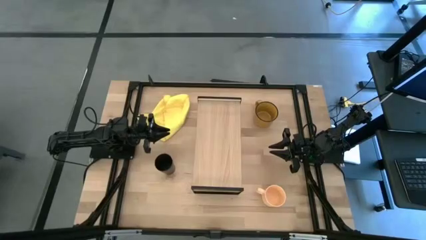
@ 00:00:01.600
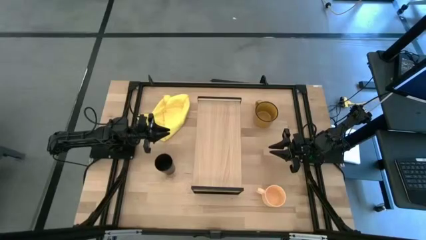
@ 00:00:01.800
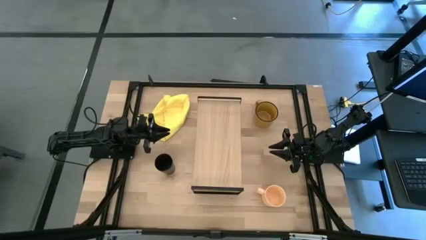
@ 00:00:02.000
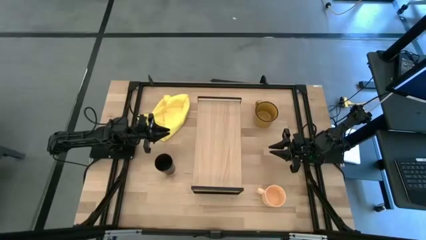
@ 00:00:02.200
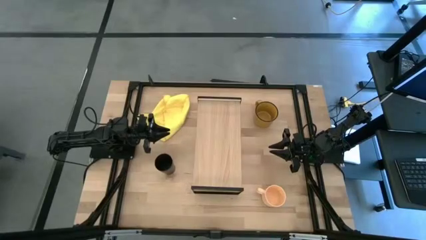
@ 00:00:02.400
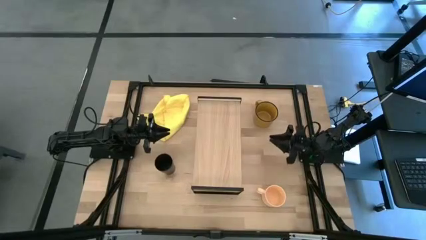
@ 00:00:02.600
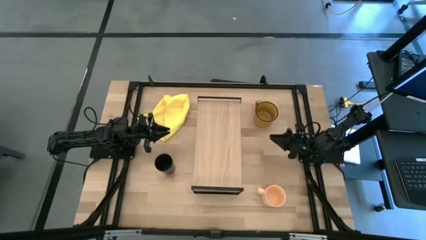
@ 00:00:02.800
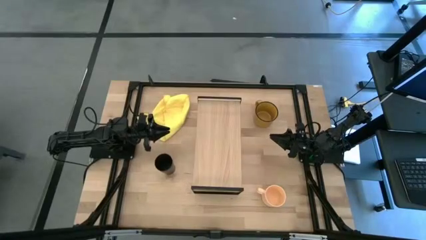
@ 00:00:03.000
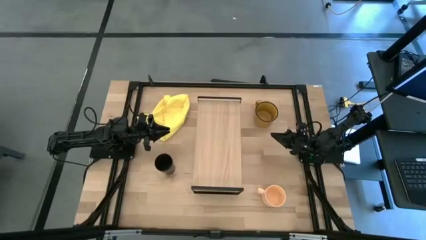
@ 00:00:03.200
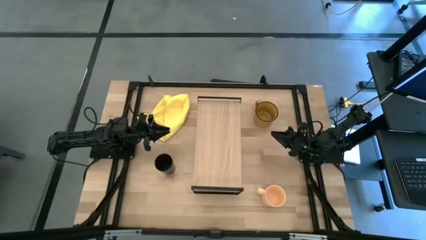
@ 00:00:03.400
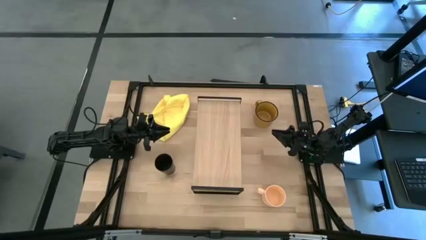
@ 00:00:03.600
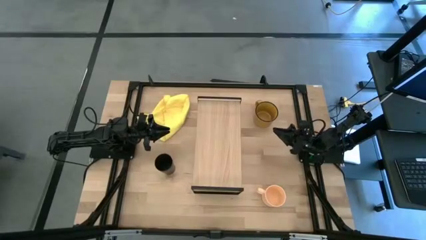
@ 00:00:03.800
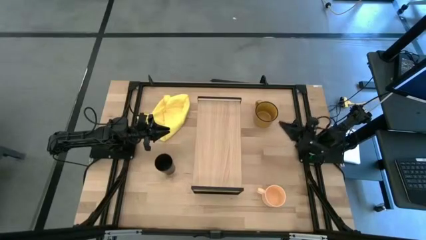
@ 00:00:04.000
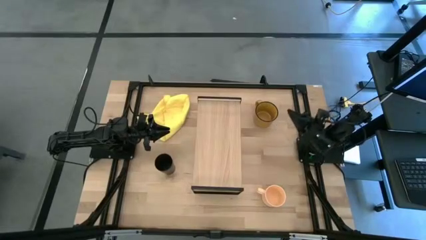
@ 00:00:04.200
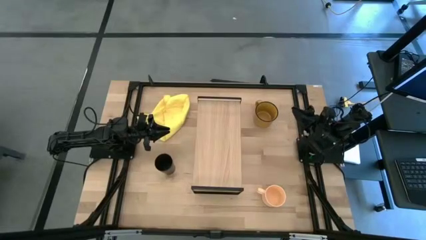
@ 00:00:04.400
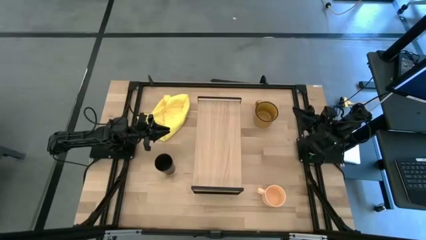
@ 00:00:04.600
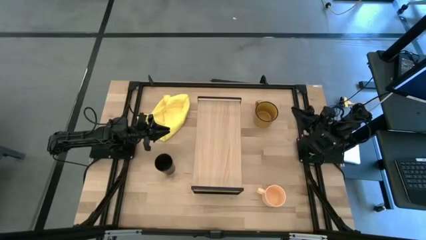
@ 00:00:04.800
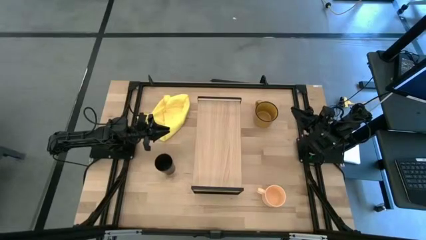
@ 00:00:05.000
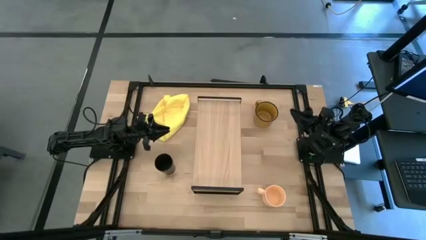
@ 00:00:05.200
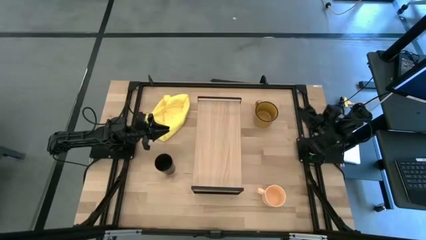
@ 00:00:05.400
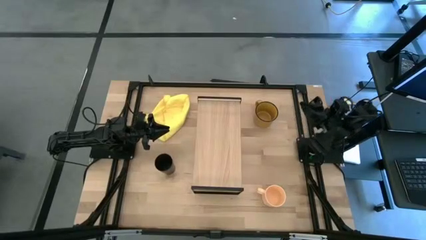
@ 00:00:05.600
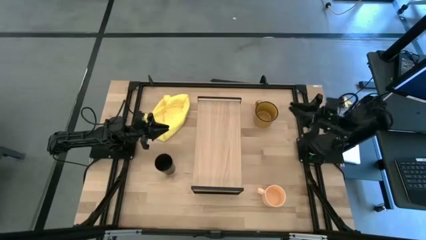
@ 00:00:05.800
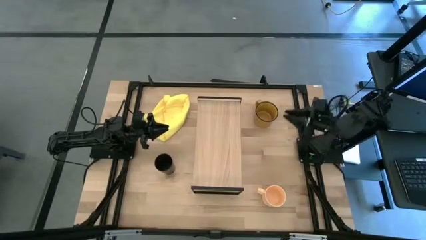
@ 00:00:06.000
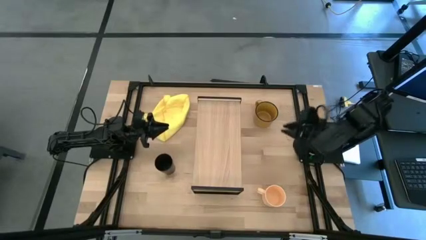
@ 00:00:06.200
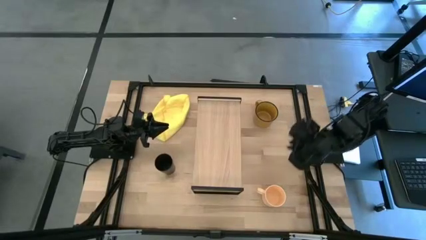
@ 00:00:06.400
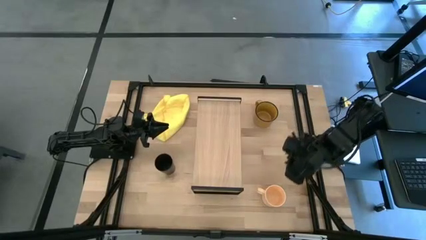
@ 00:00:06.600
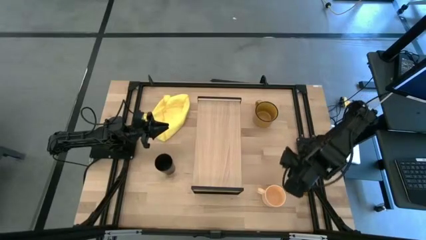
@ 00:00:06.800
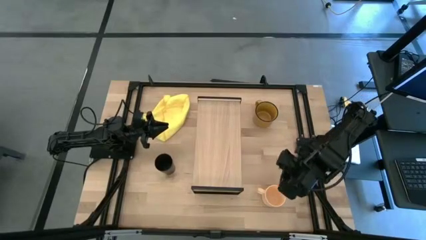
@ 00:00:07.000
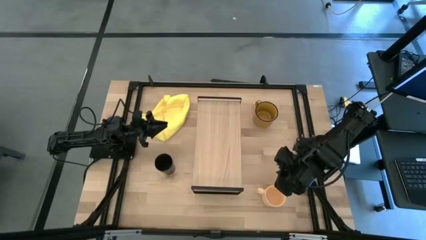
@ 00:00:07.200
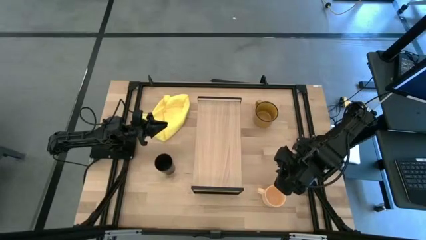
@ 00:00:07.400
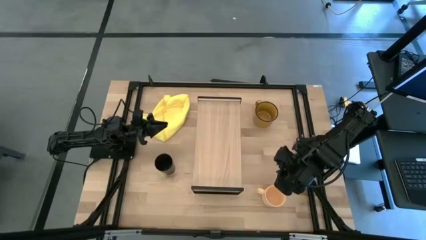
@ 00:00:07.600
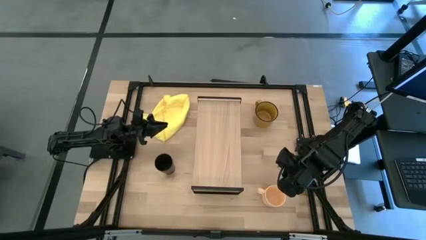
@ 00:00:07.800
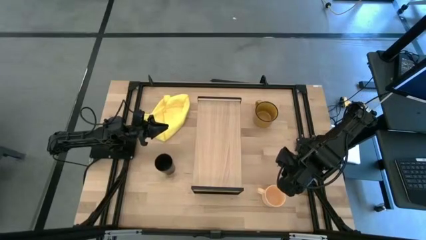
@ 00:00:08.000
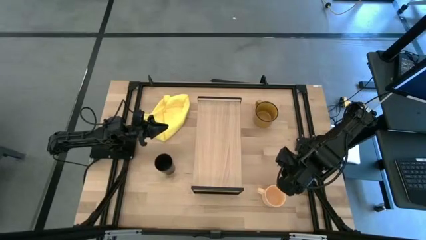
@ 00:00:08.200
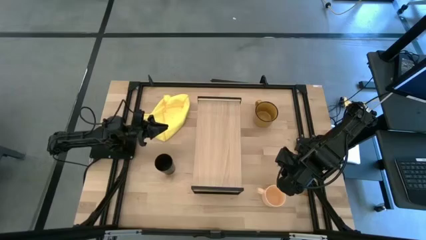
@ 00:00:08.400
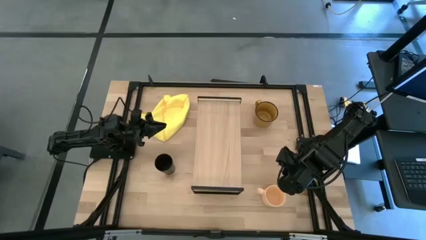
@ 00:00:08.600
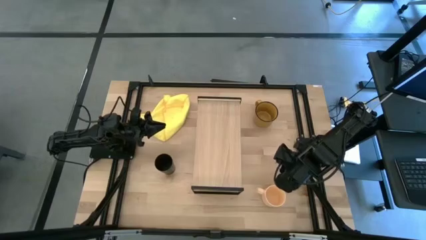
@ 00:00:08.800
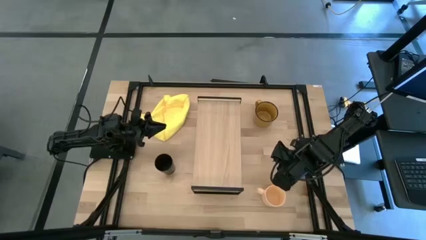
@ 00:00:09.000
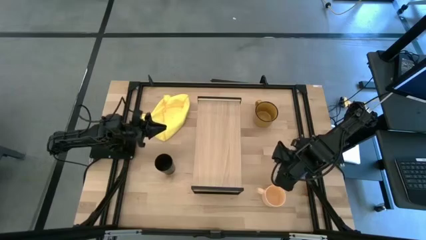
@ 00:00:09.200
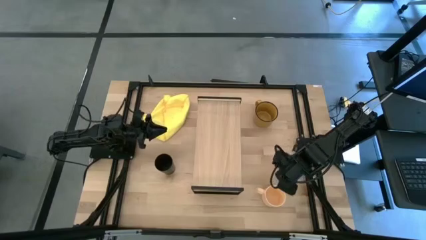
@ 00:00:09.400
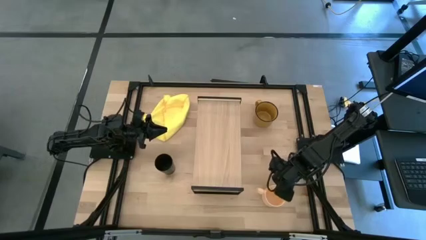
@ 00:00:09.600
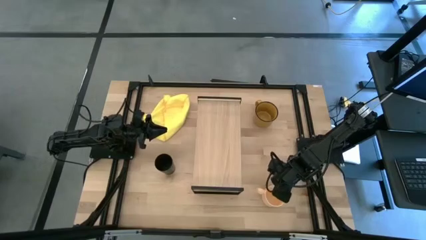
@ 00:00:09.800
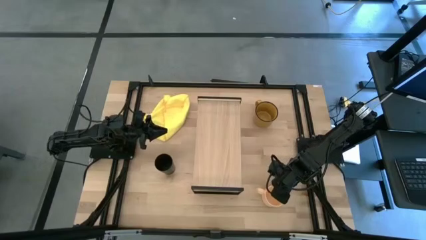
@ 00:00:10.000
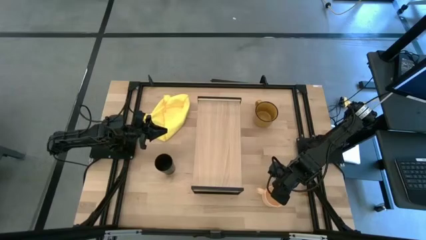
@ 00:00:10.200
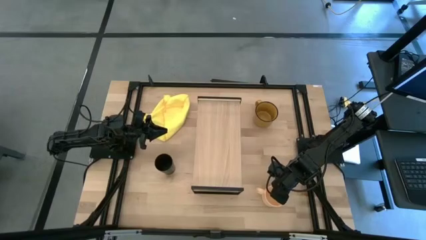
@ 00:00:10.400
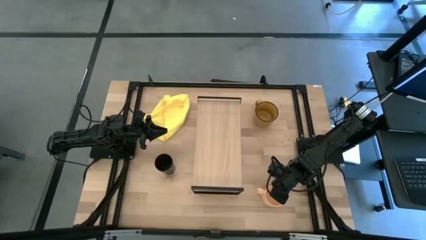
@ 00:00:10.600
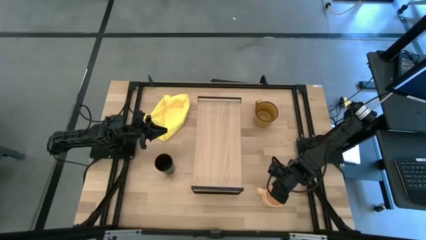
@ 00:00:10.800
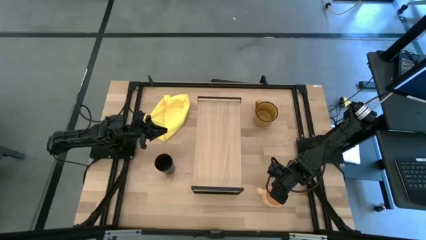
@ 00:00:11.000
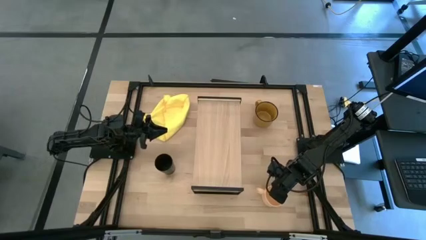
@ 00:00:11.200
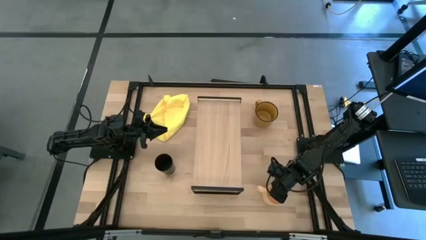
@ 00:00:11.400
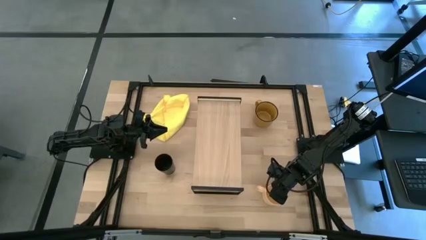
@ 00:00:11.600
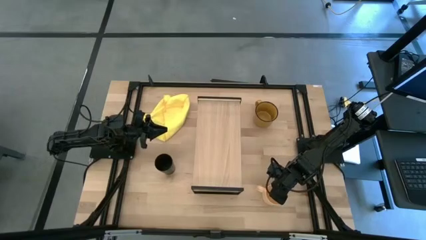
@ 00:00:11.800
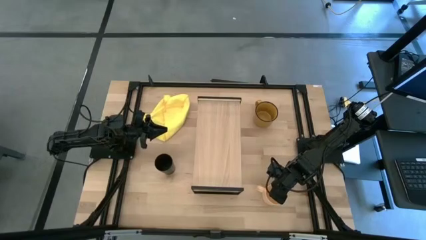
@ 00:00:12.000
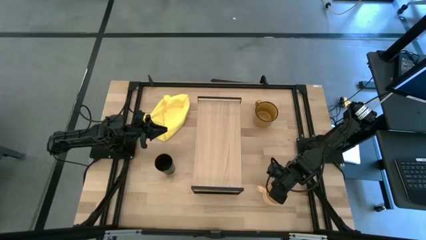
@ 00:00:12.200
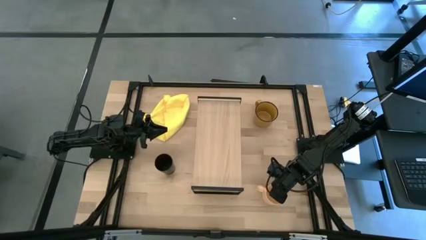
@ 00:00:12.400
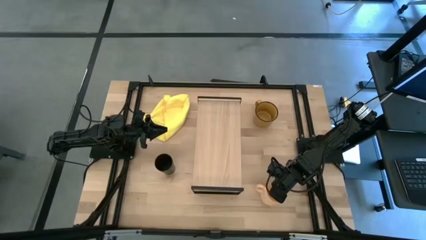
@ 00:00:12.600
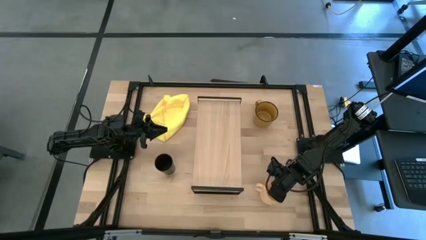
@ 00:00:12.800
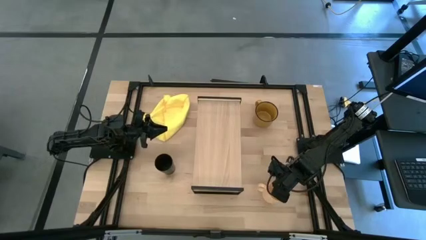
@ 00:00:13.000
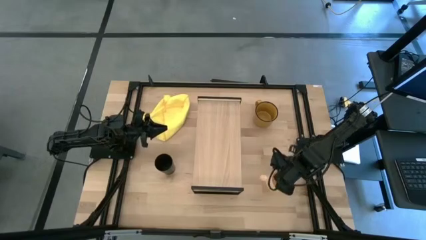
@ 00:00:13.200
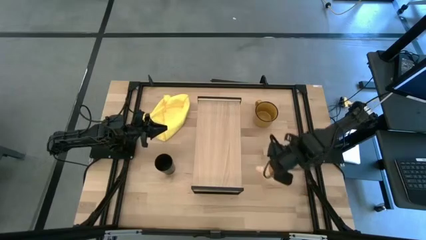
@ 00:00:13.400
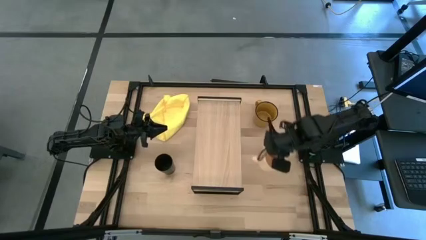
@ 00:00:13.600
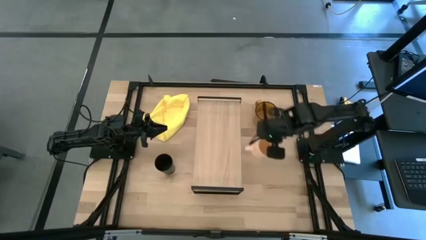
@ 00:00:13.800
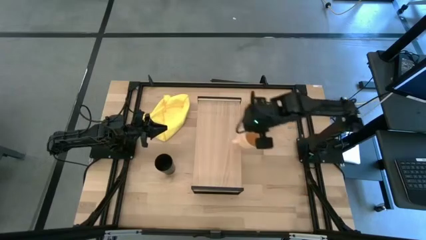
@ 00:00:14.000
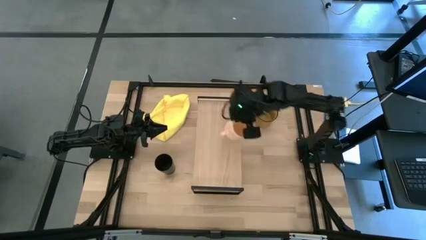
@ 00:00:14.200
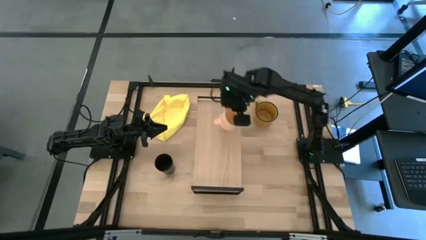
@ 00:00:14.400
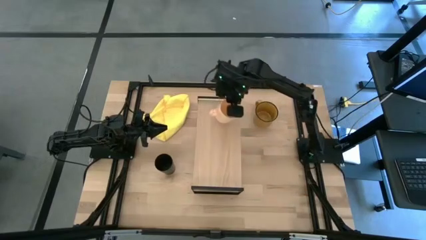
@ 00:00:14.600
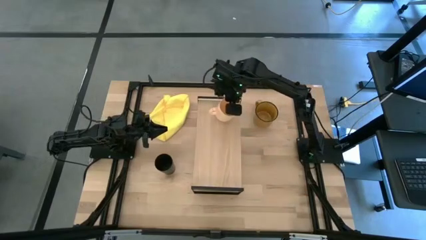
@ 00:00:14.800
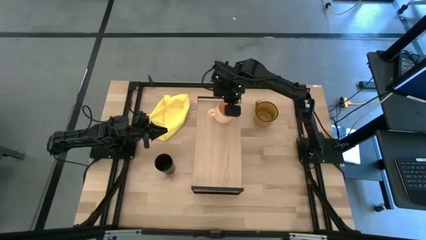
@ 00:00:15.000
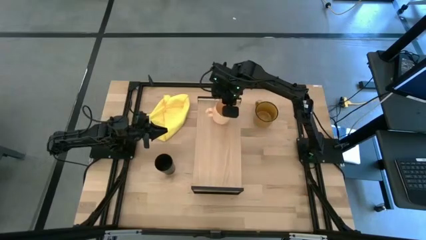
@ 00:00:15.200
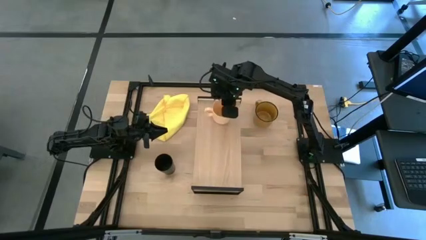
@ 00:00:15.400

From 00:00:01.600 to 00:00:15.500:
Task: Stack small to large cups/mugs on shelf
Put the orange mug on the shelf
